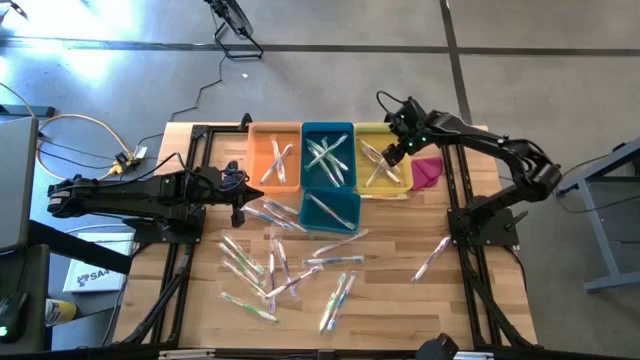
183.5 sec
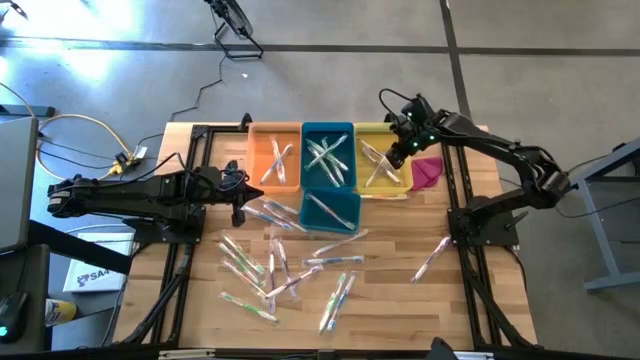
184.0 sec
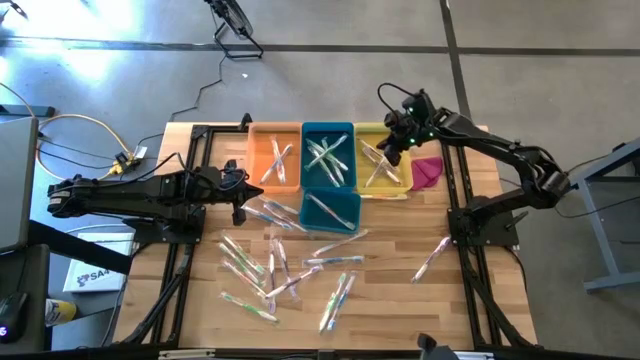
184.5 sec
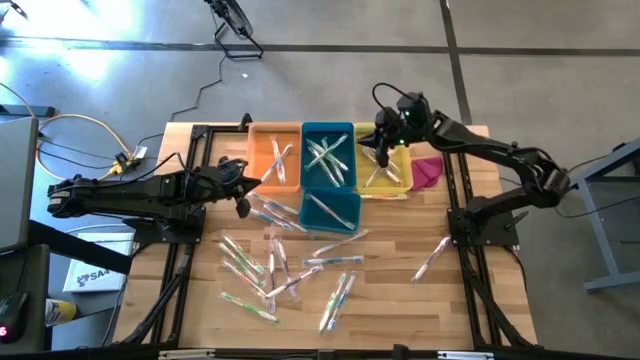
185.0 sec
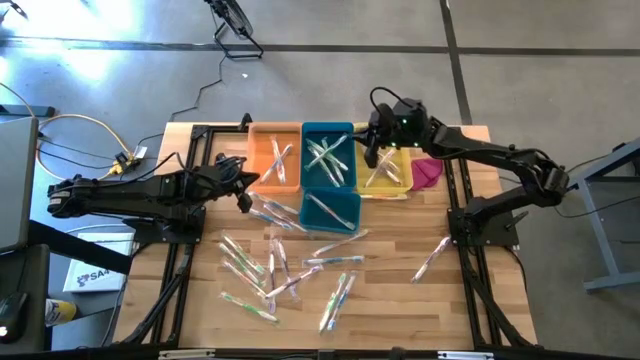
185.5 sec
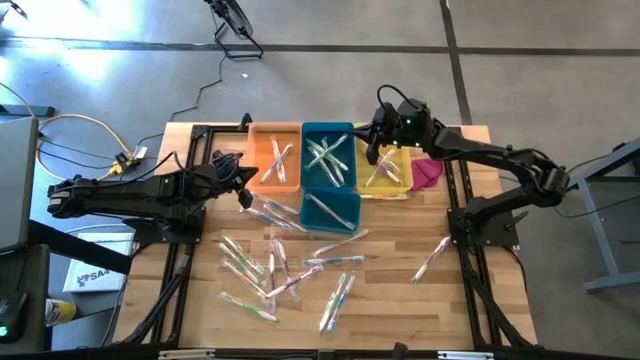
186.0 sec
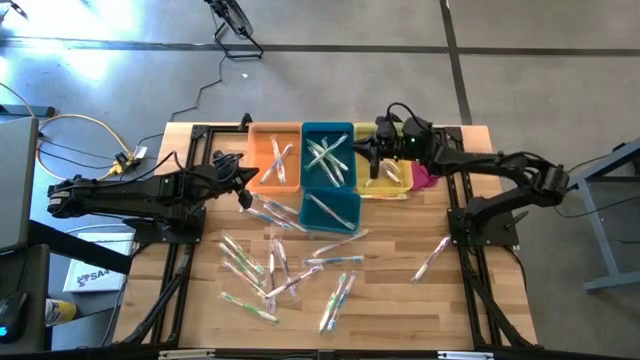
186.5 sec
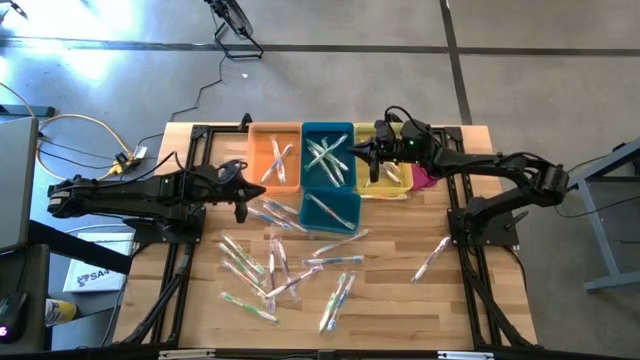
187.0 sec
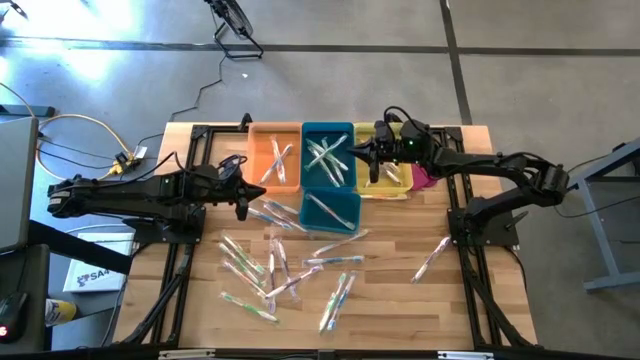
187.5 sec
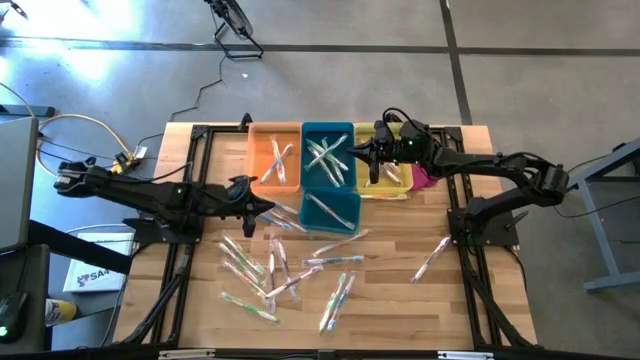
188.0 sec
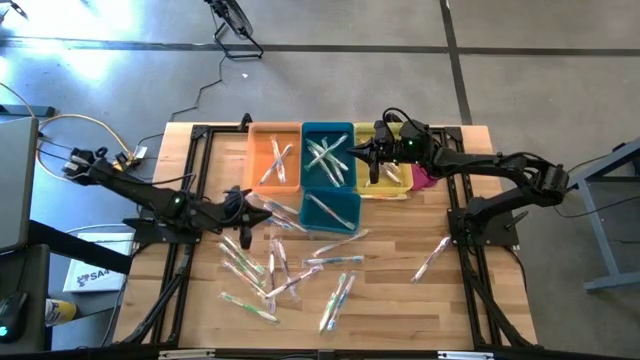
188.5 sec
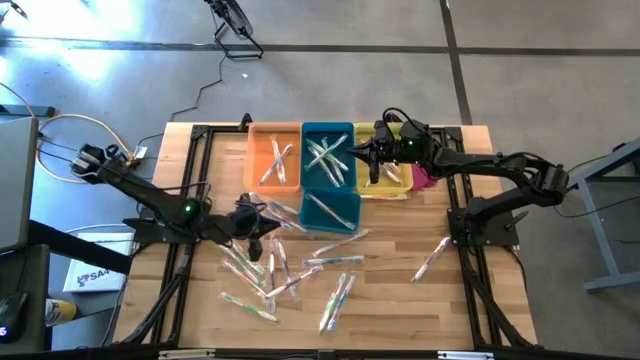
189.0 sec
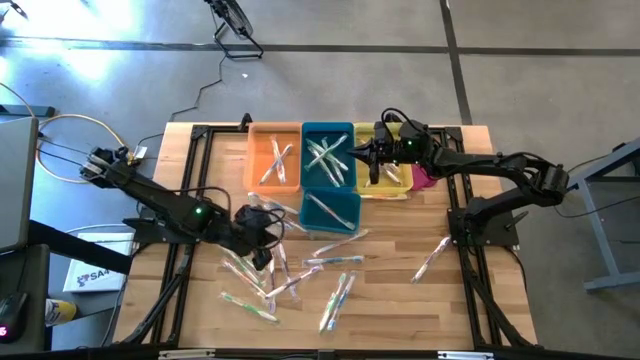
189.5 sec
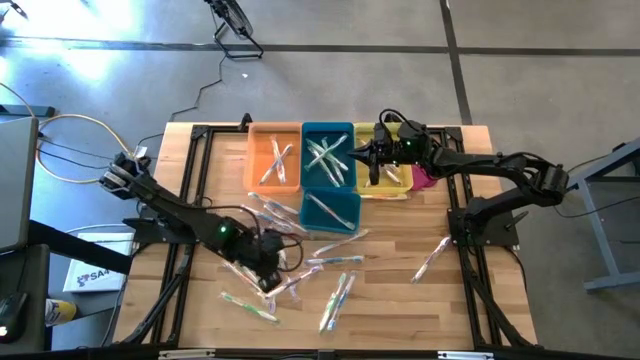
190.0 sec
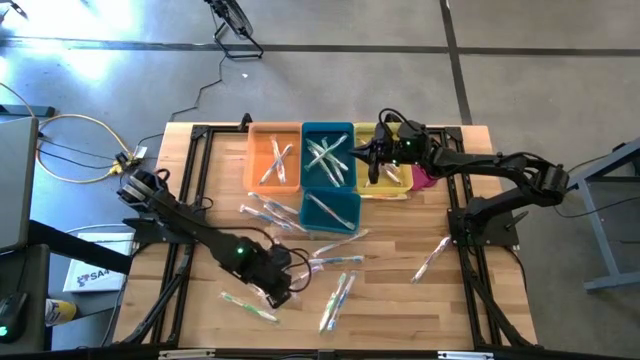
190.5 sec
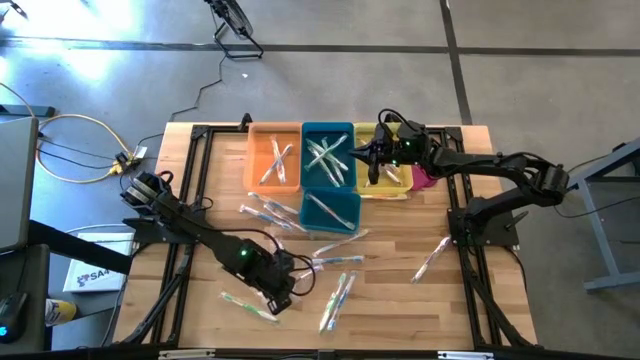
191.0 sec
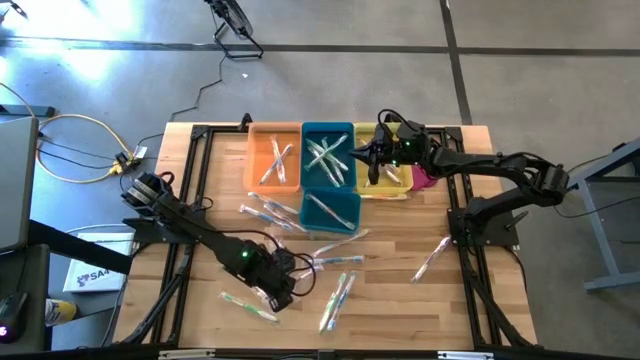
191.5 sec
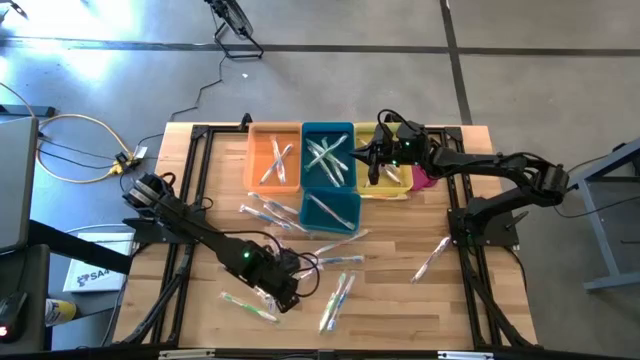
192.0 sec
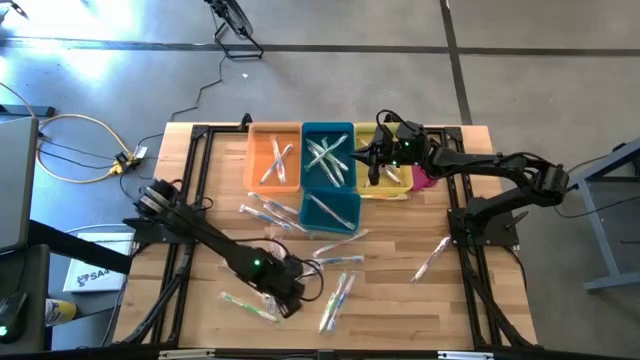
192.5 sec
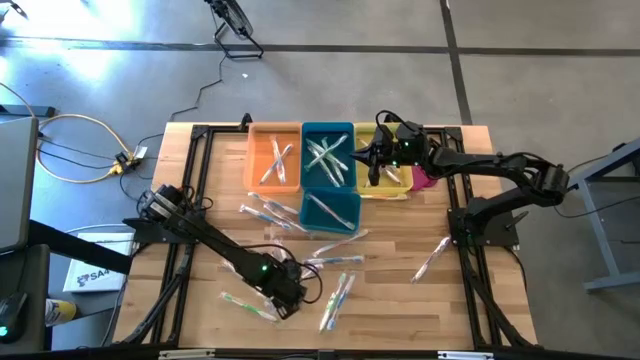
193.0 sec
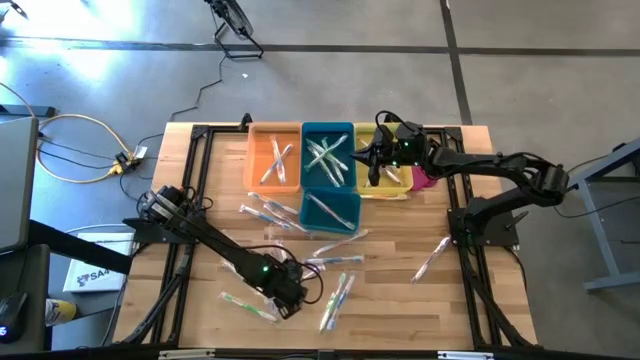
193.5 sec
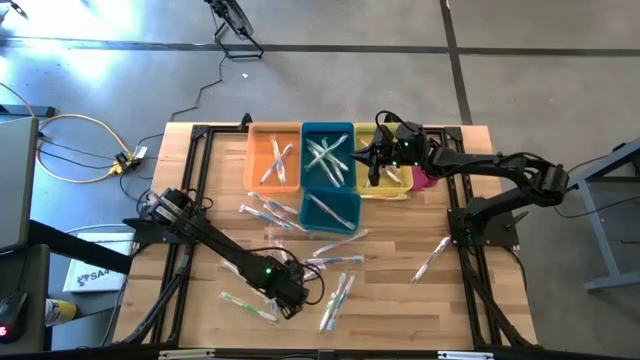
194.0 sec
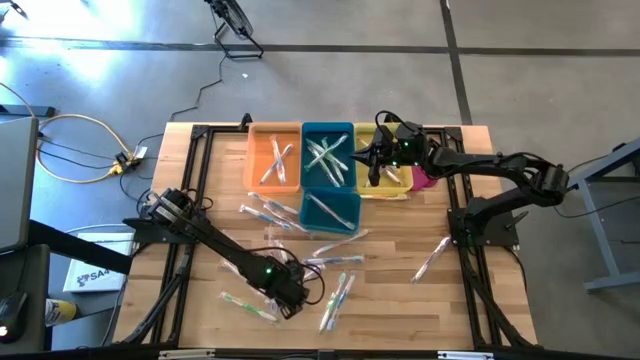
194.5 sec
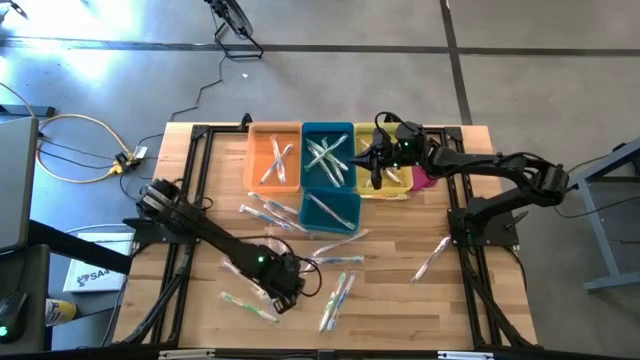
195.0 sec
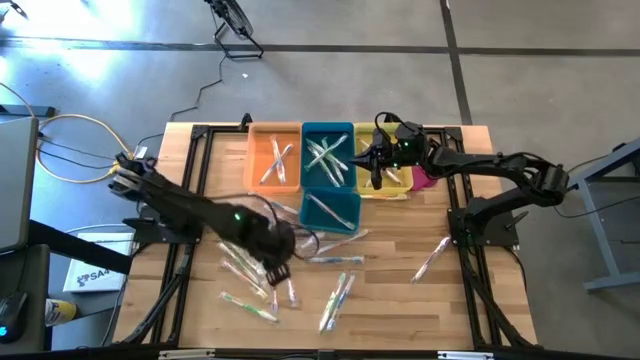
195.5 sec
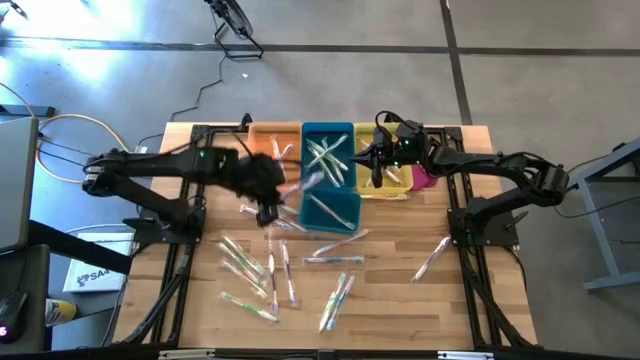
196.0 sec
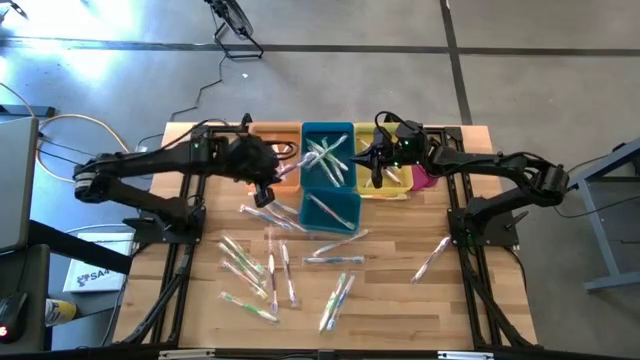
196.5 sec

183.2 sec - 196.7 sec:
Task: Pick & Place Toothbrushes
Put the violet toothbrush into the yellow bin

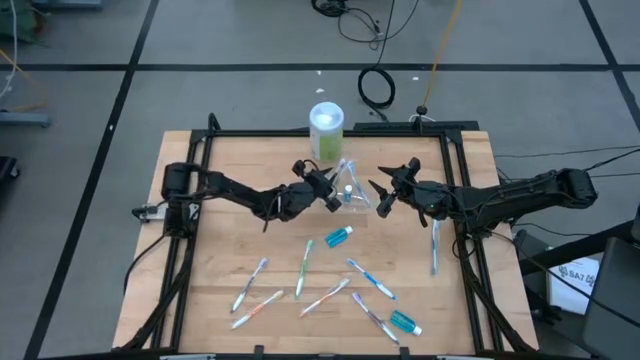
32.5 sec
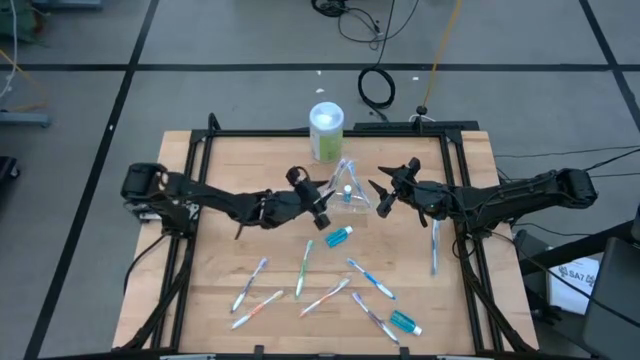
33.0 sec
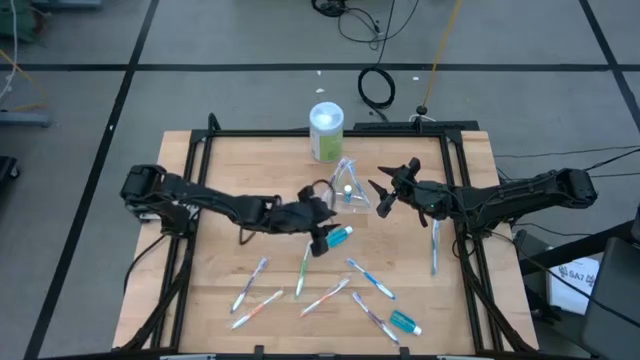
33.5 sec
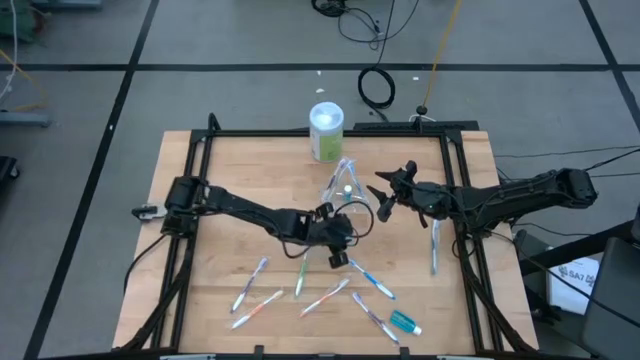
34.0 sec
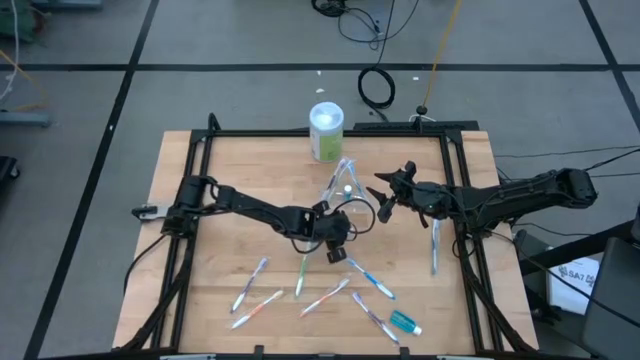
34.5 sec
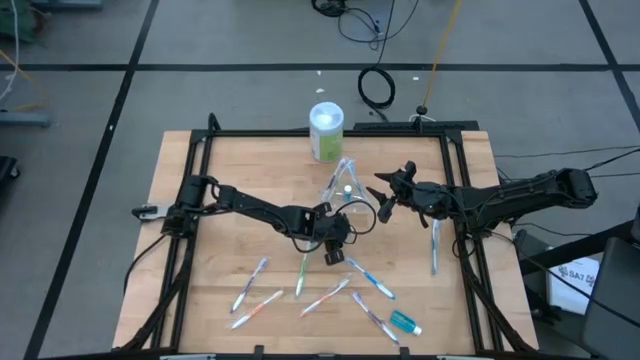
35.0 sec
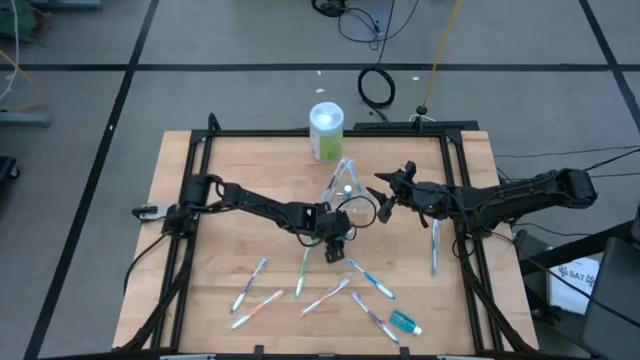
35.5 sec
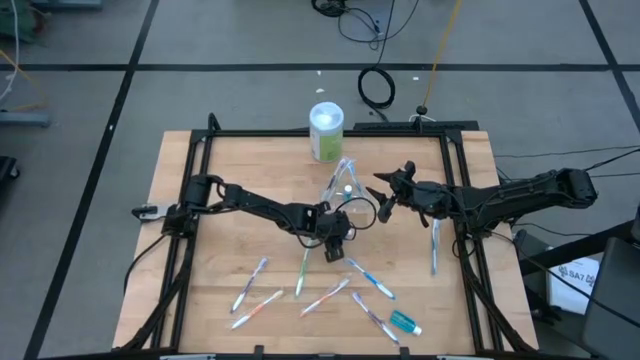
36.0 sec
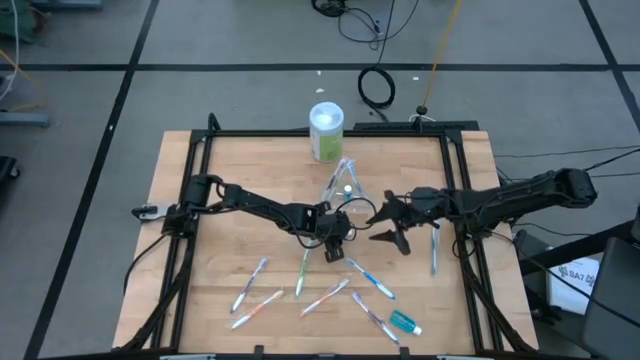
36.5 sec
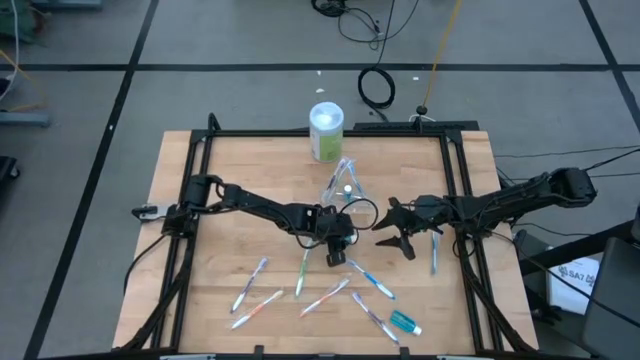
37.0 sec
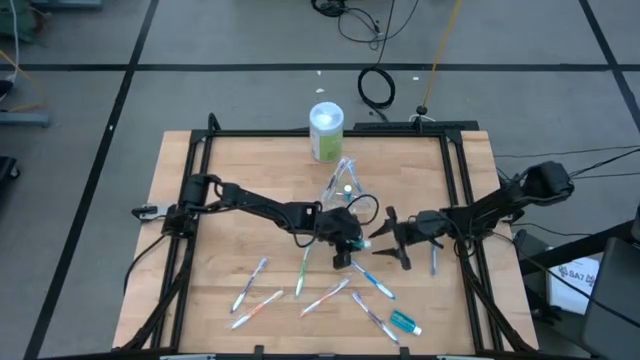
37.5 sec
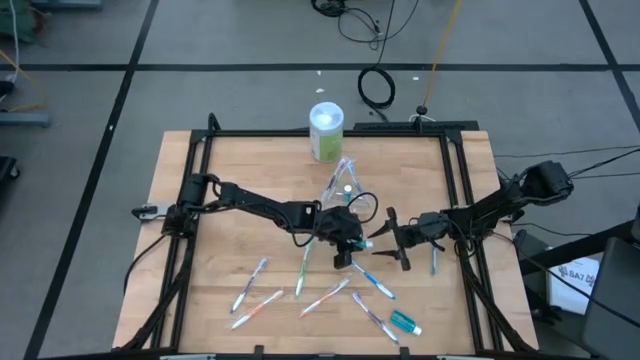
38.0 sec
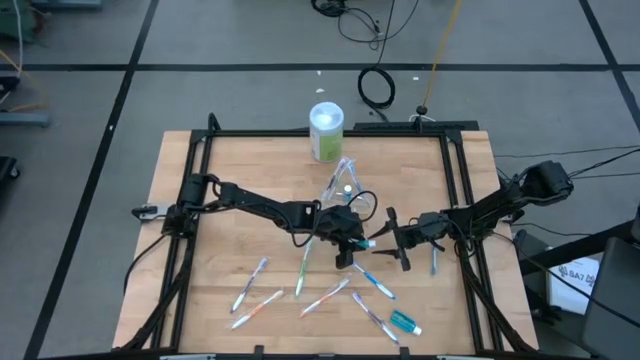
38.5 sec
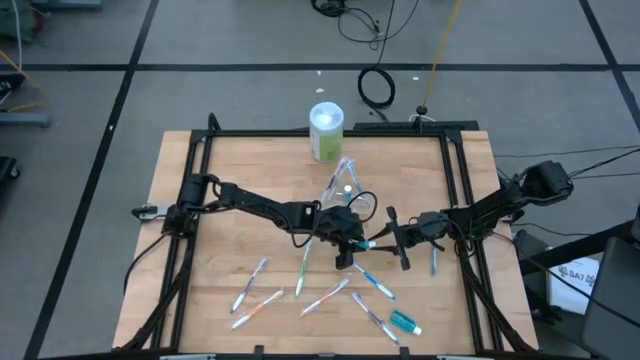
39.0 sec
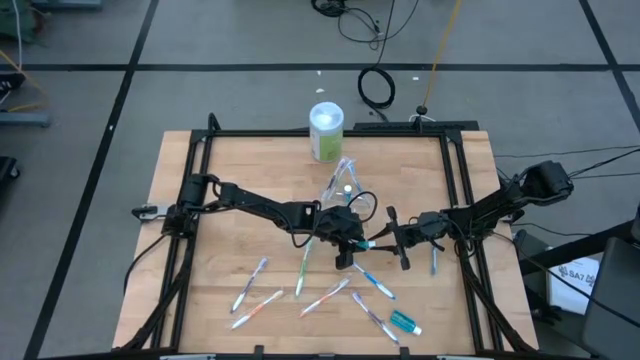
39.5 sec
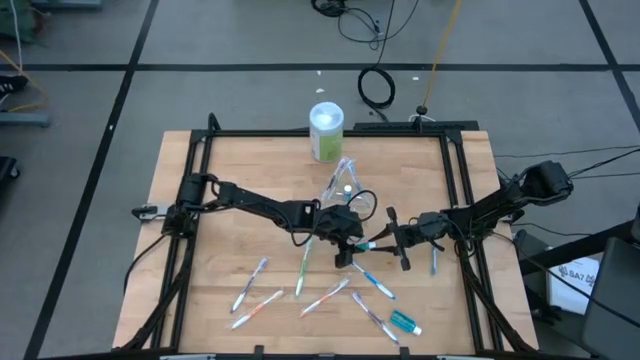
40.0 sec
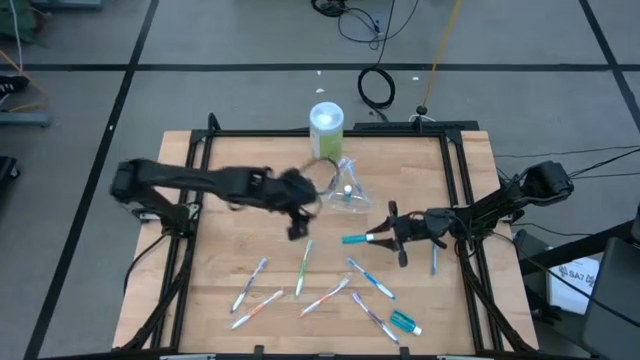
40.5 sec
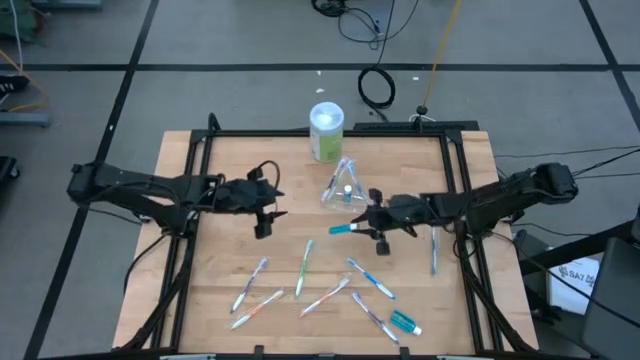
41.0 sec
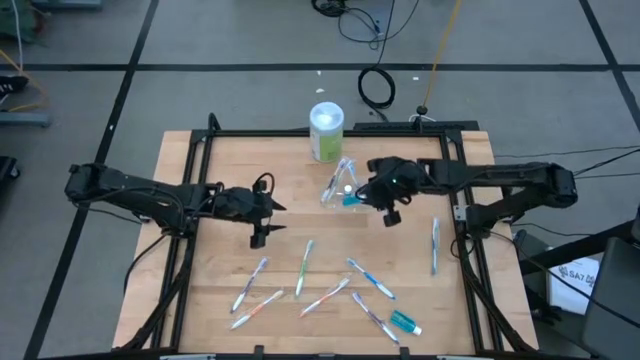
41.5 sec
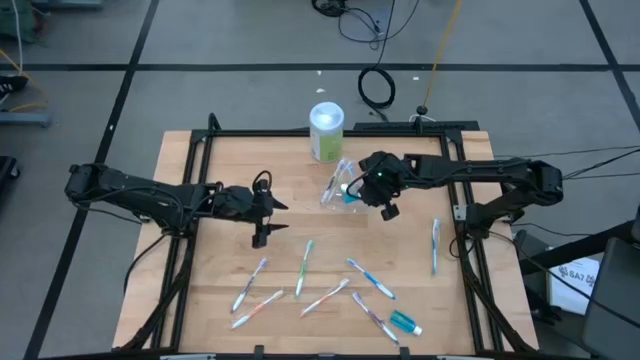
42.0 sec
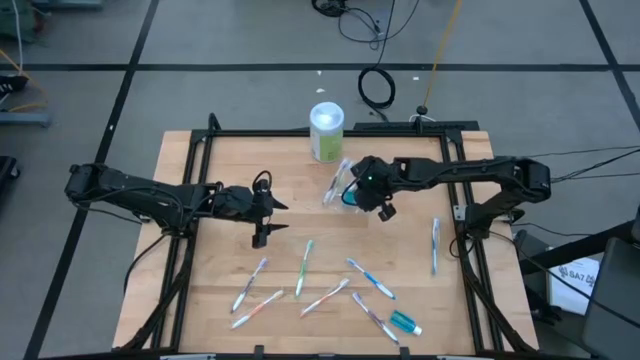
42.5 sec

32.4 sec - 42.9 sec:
Task: Pick & Place toothbrushing station
Put the top mouthwash into the transparent organizer
